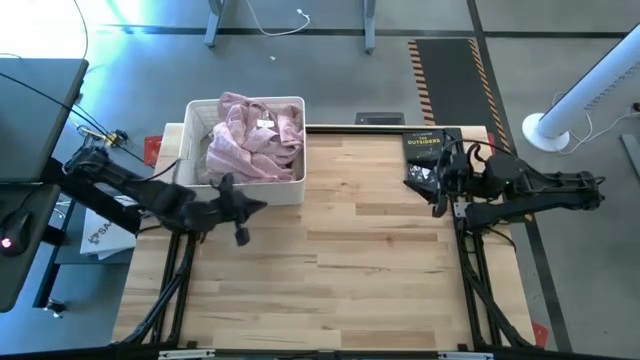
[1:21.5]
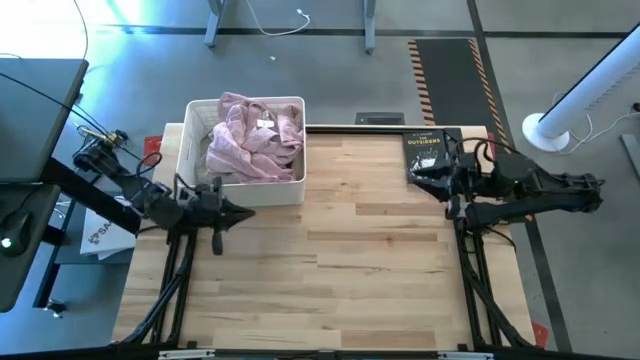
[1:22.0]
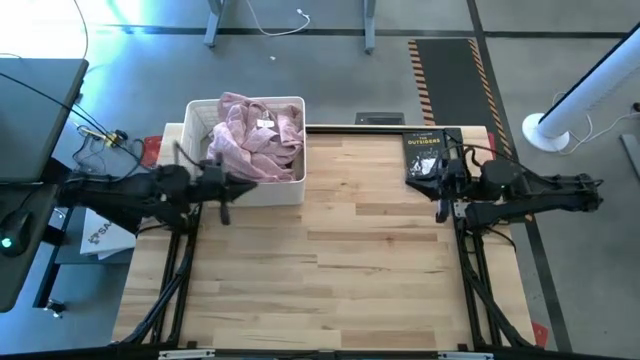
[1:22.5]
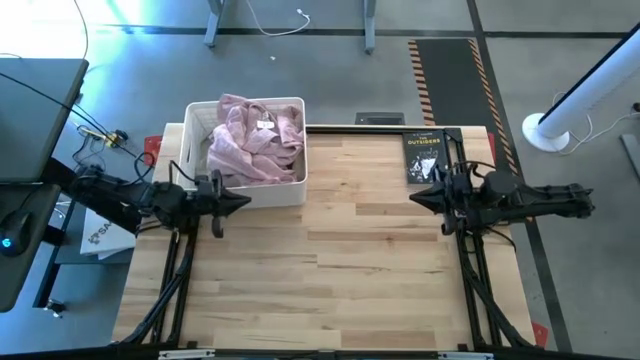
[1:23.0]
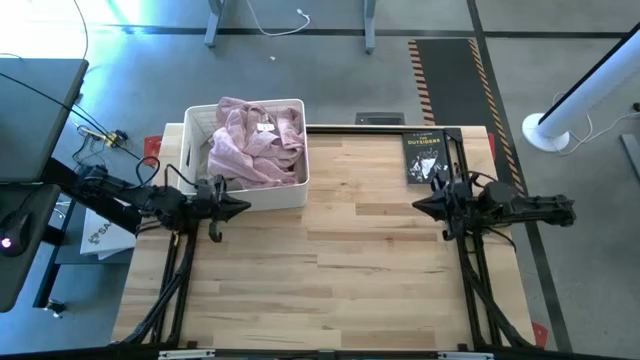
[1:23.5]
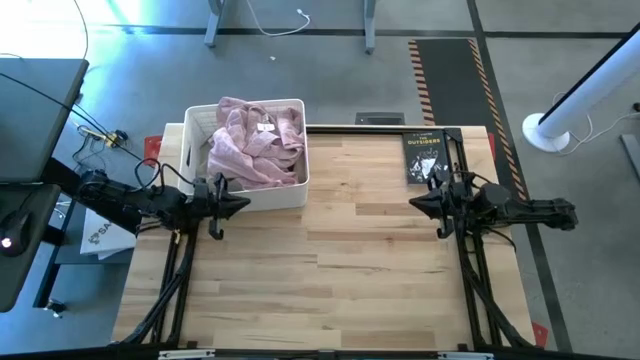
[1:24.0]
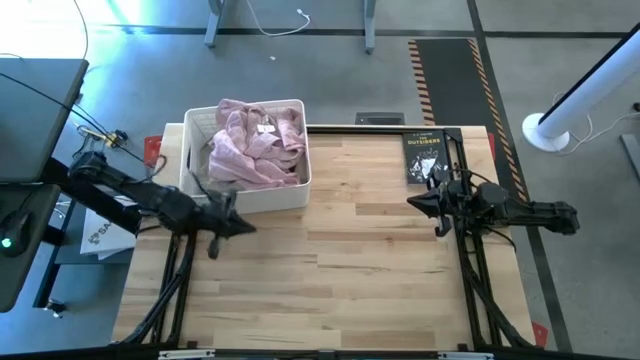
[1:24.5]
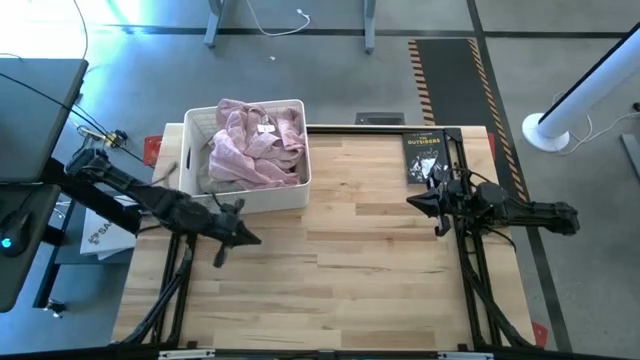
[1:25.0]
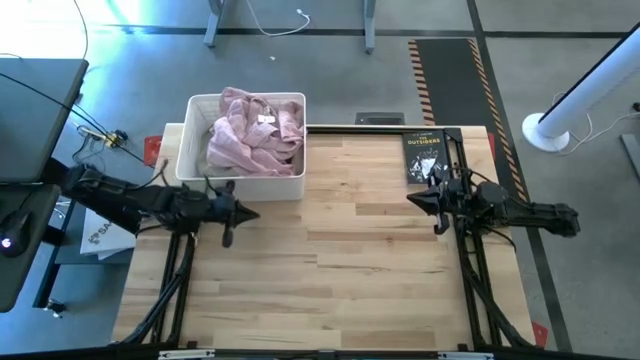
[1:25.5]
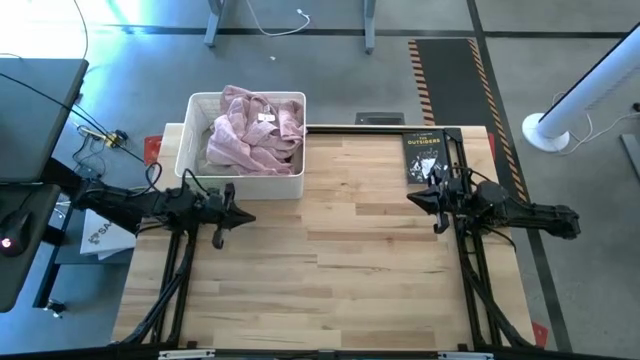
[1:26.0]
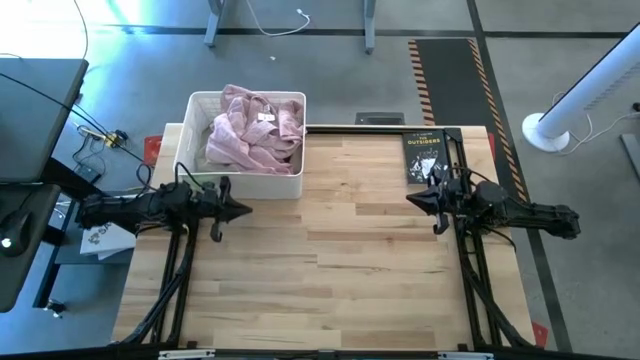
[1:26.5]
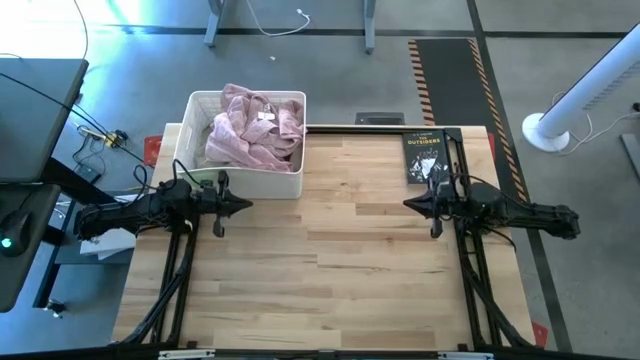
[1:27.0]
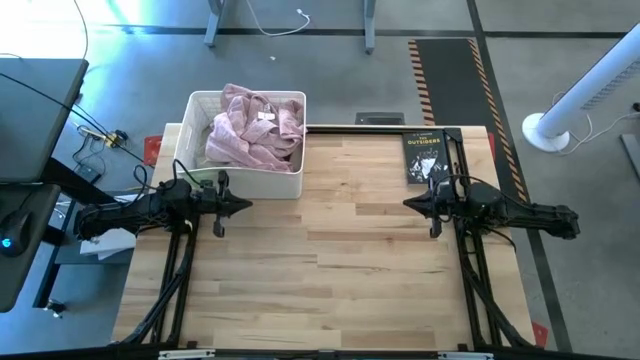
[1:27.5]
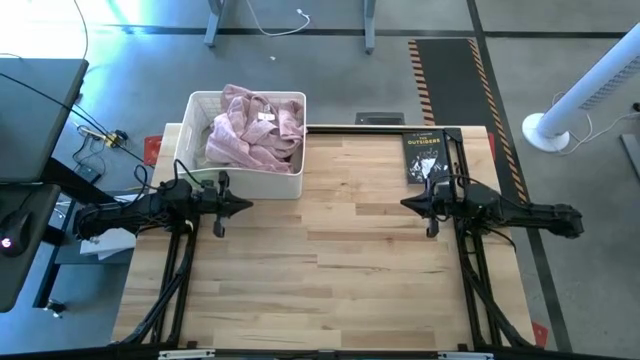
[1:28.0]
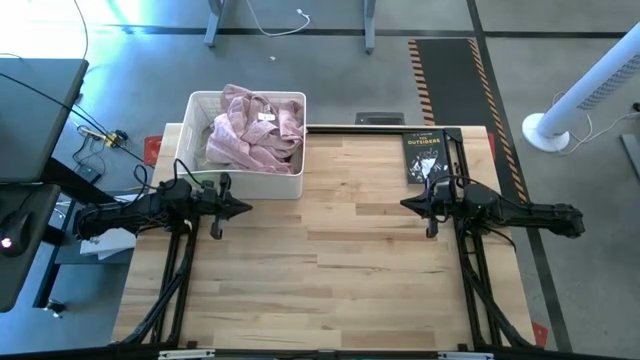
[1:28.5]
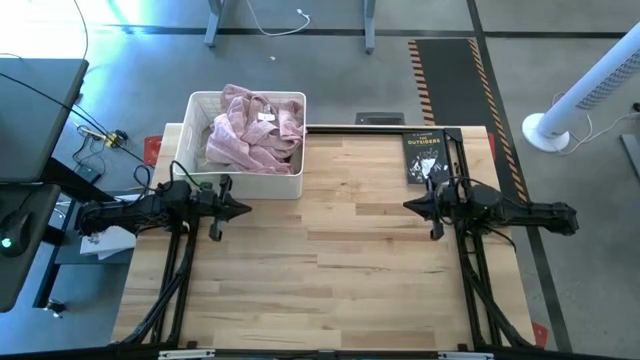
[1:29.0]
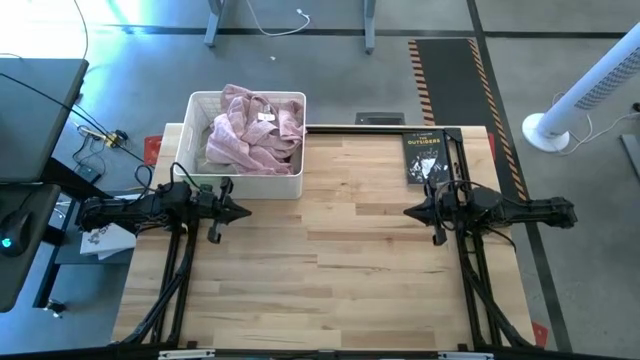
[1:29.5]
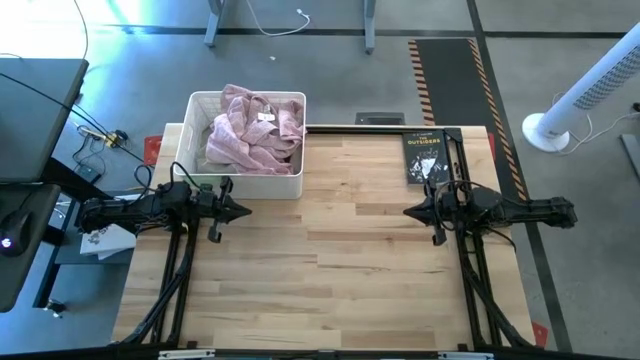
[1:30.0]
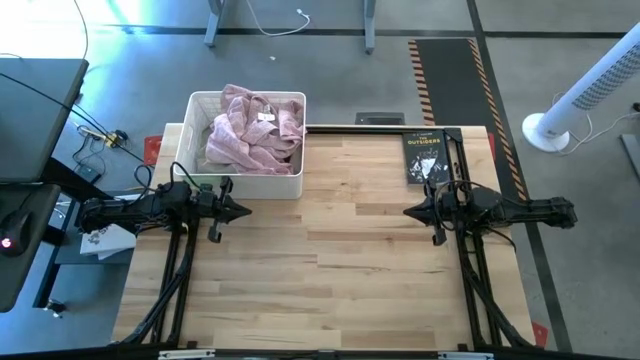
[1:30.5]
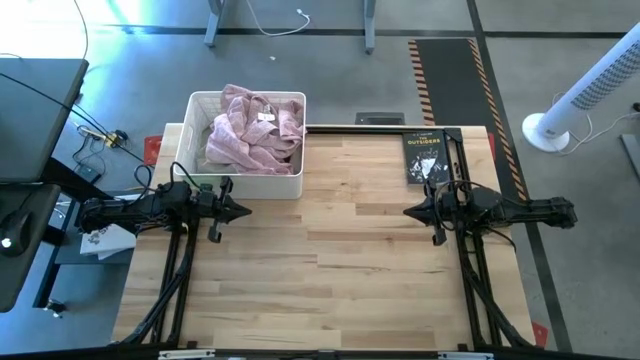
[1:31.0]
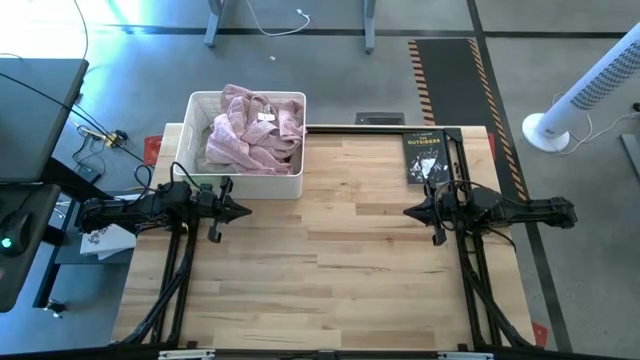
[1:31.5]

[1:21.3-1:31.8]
Task: Sort clothes
Return to Home Position

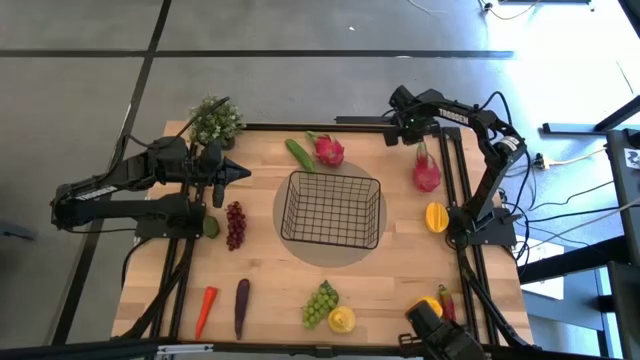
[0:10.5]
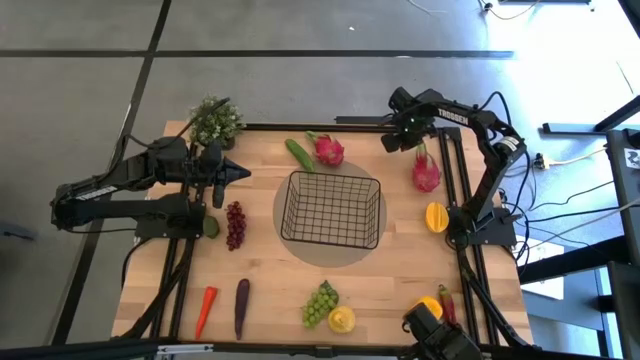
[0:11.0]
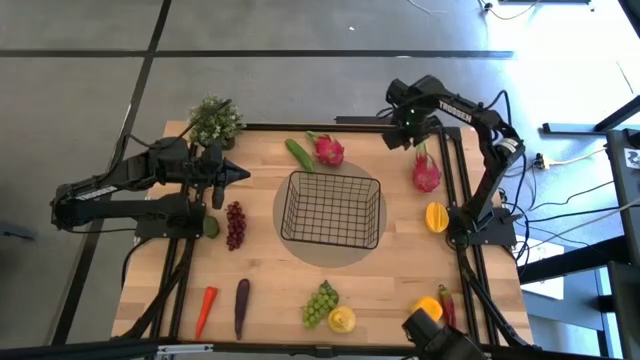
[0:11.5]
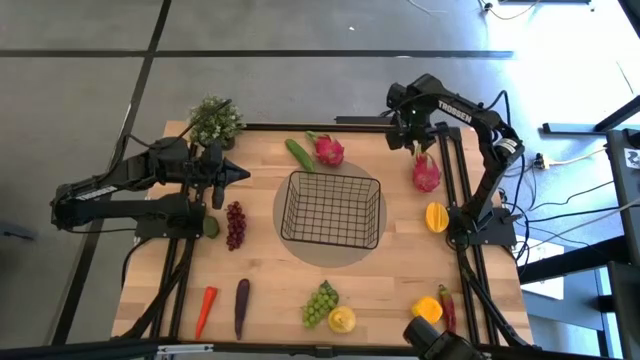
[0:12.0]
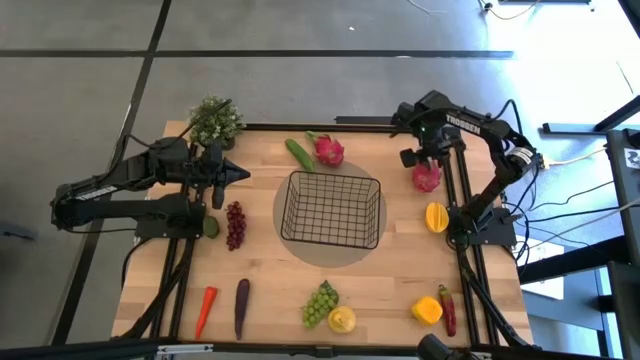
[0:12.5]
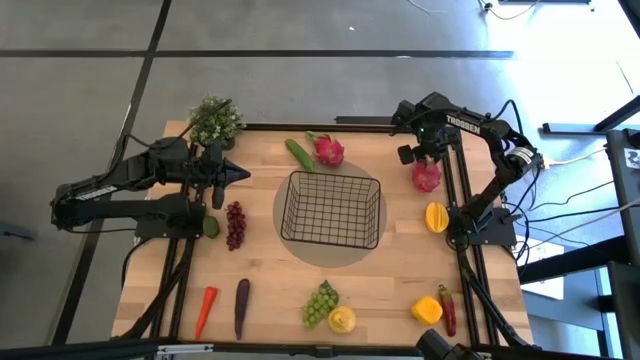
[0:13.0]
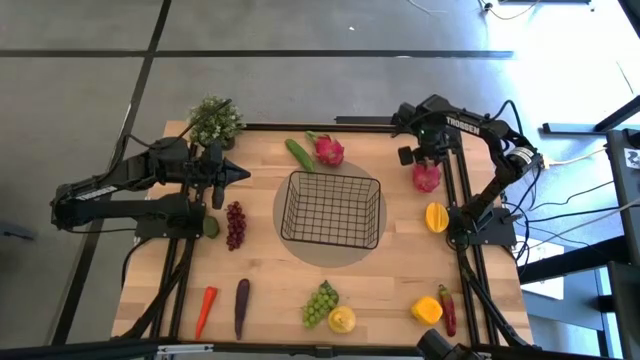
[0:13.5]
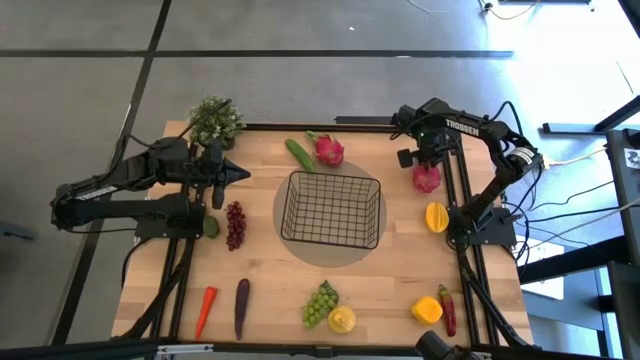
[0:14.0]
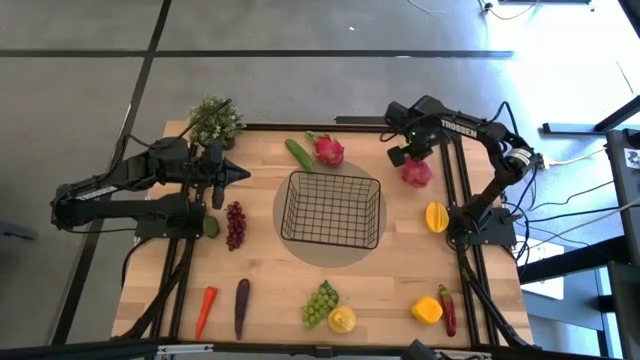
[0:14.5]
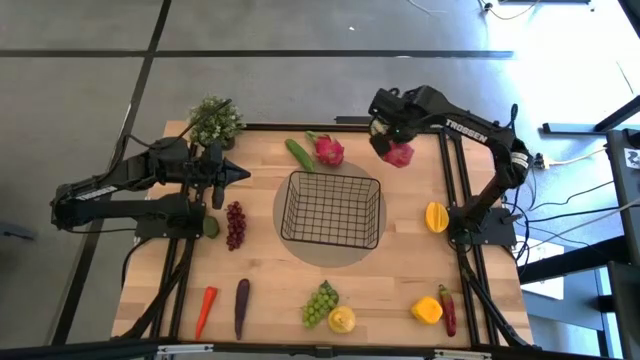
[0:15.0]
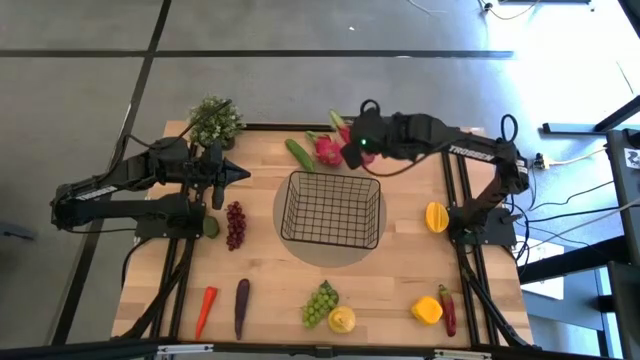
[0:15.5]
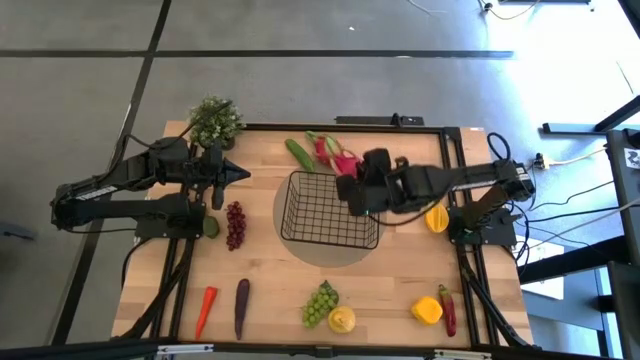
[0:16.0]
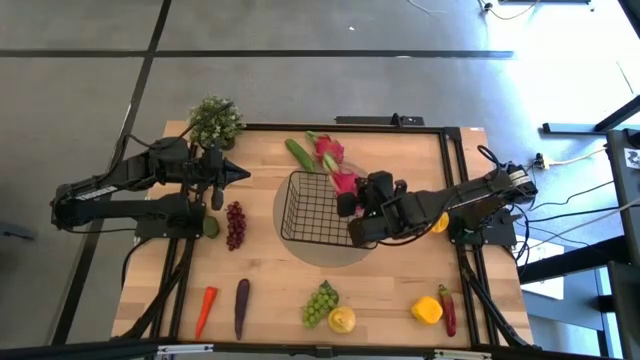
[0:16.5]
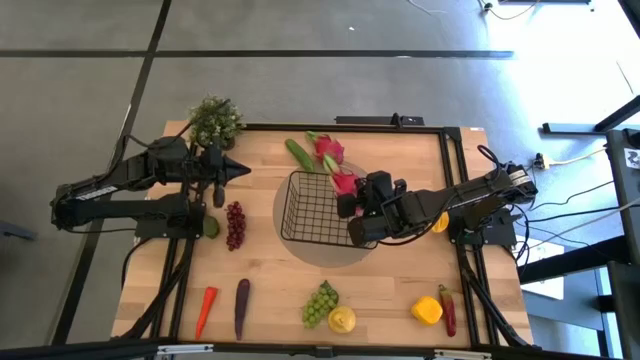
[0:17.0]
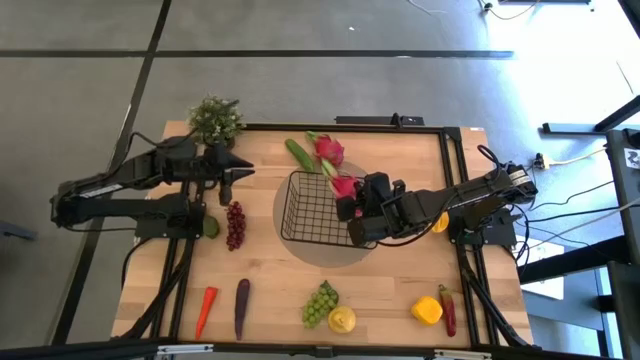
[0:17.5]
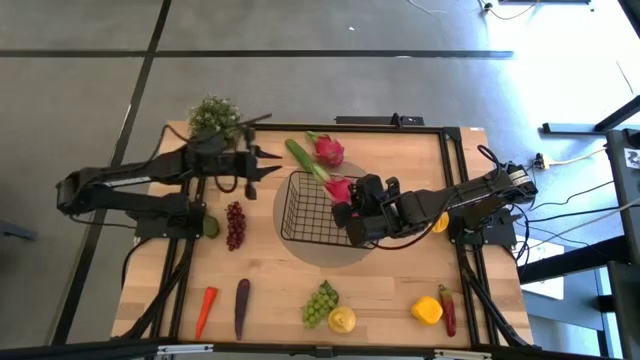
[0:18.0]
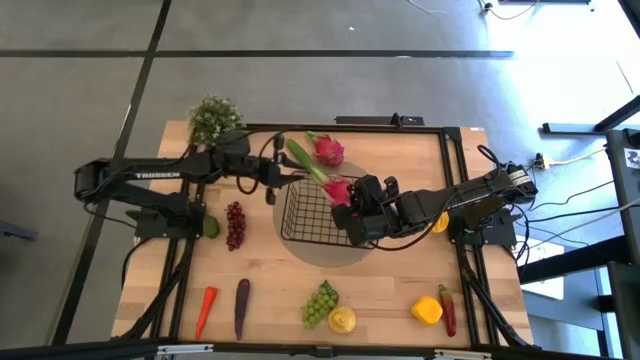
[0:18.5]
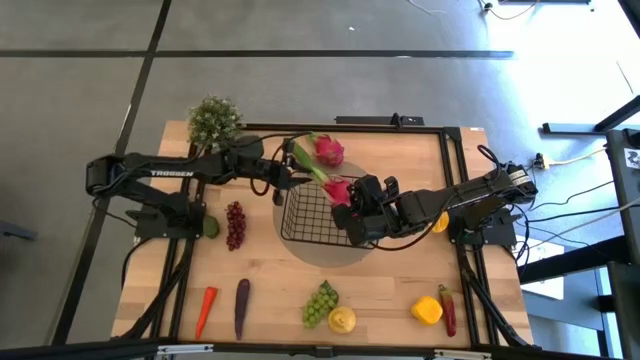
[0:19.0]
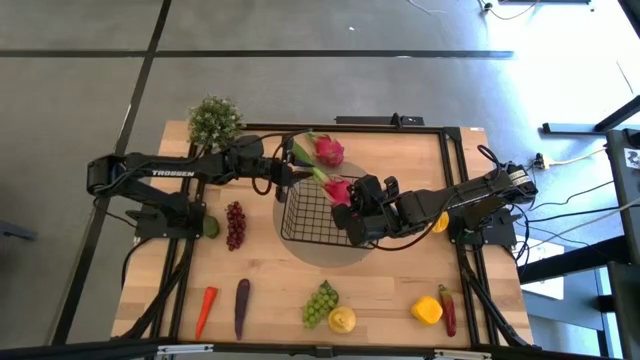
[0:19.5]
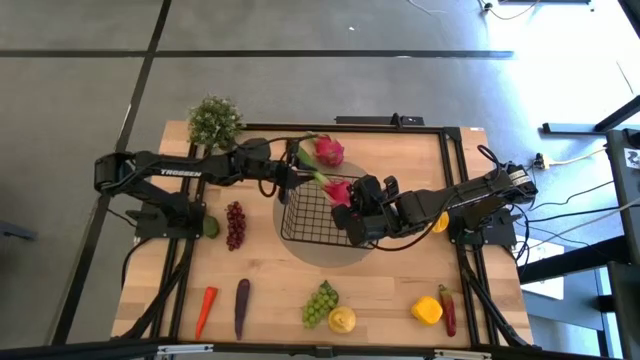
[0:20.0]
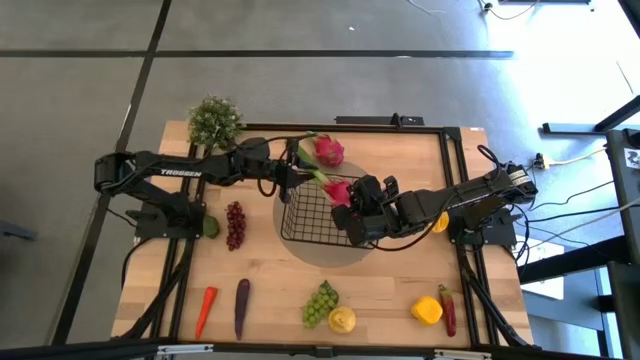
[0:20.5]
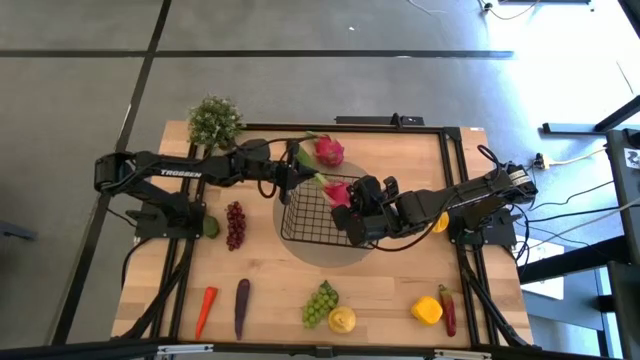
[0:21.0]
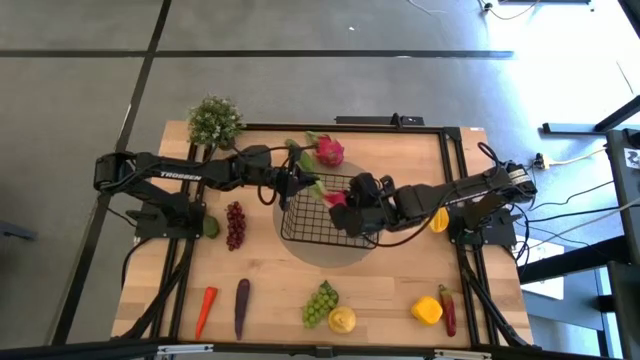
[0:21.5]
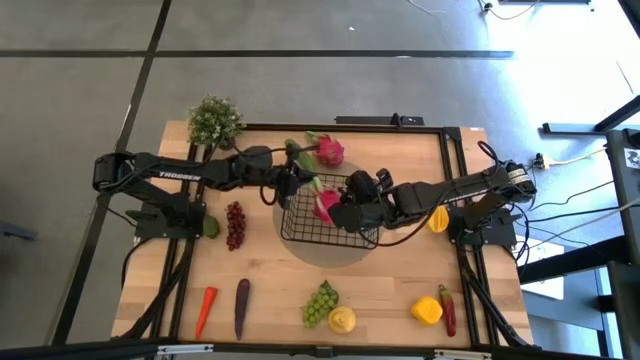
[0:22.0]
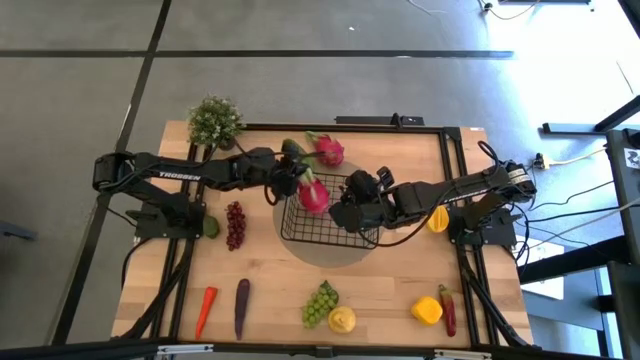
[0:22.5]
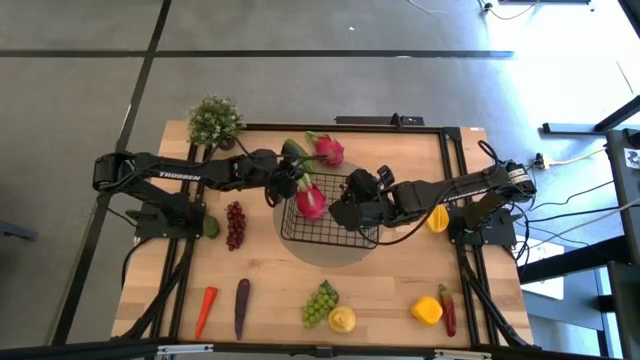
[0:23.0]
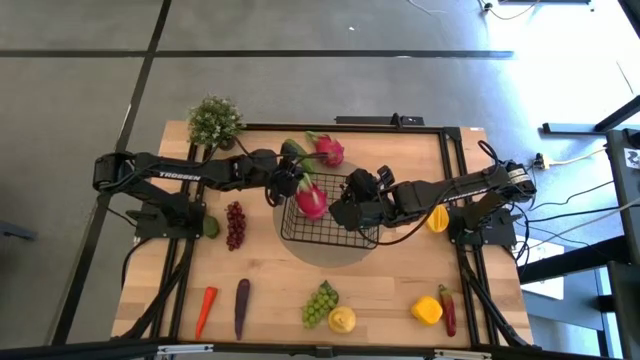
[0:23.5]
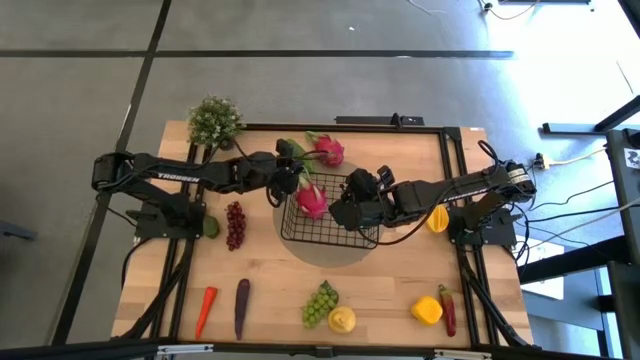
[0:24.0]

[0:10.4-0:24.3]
Task: Build produce basket
Put the right pink dragon fruit into the black wire basket
